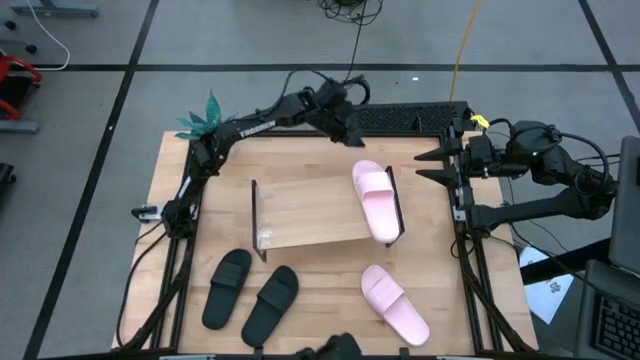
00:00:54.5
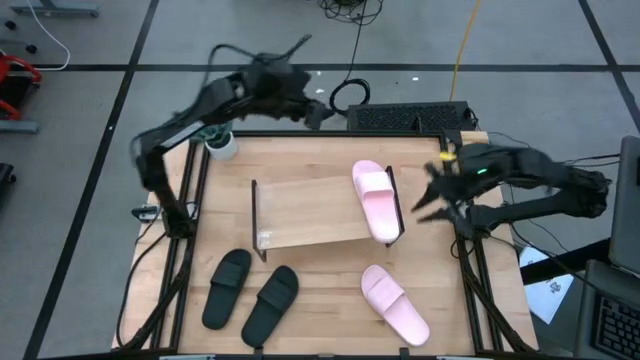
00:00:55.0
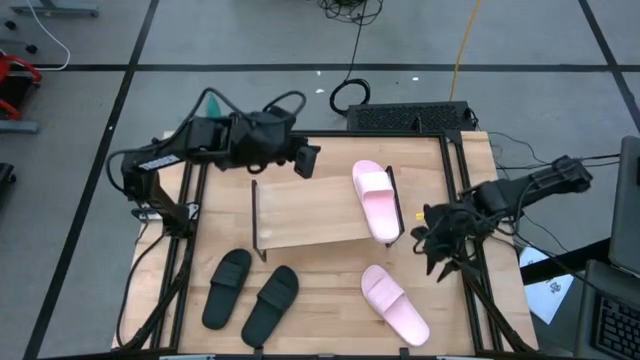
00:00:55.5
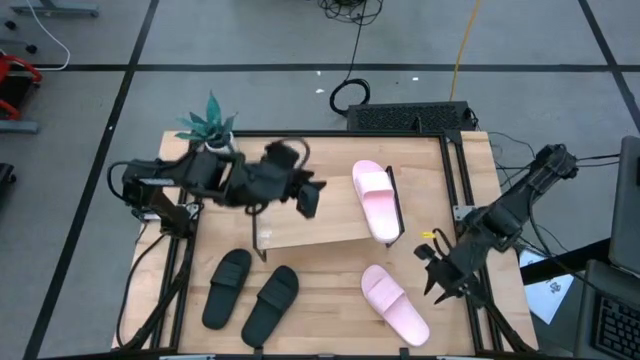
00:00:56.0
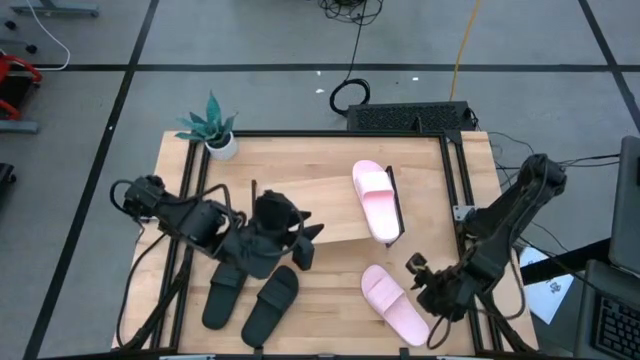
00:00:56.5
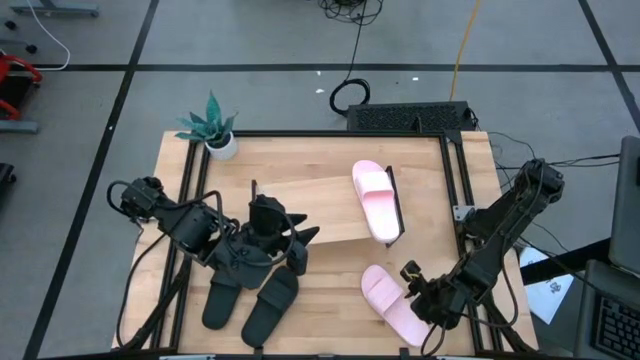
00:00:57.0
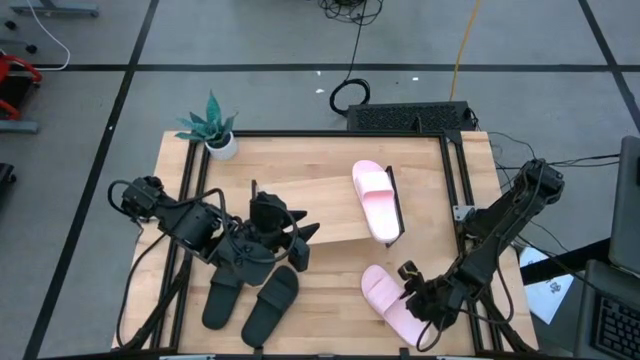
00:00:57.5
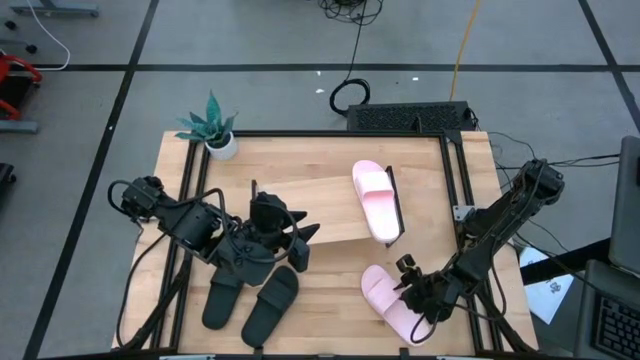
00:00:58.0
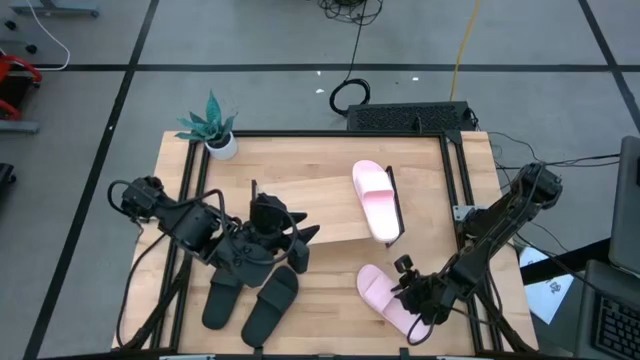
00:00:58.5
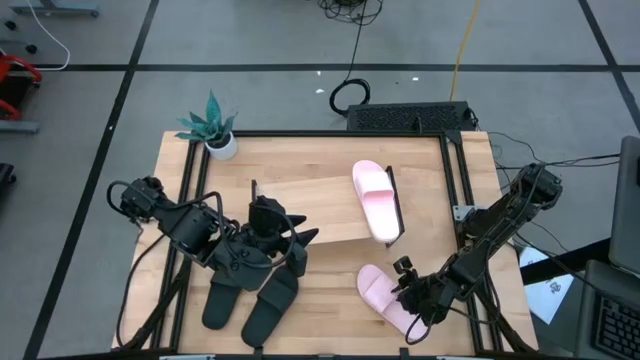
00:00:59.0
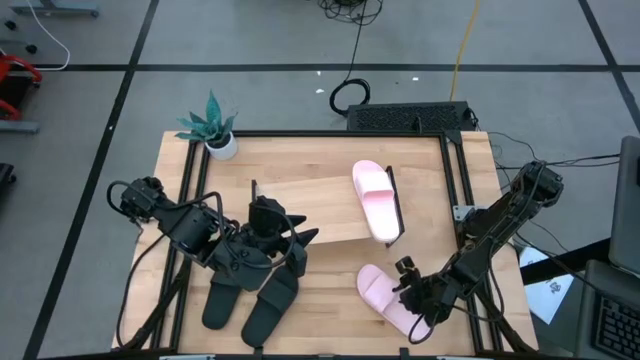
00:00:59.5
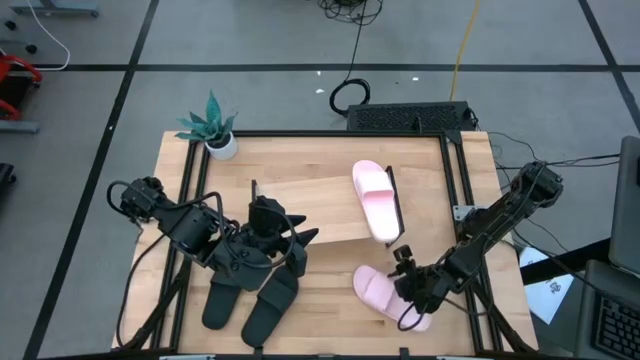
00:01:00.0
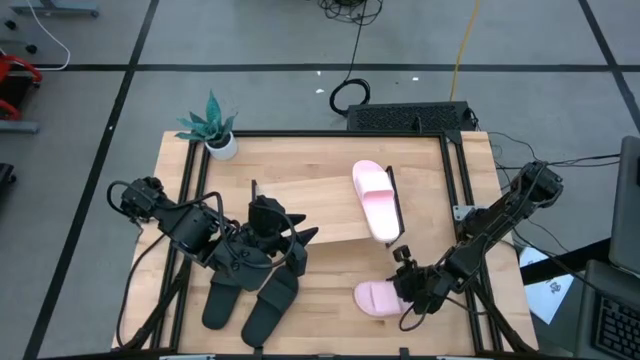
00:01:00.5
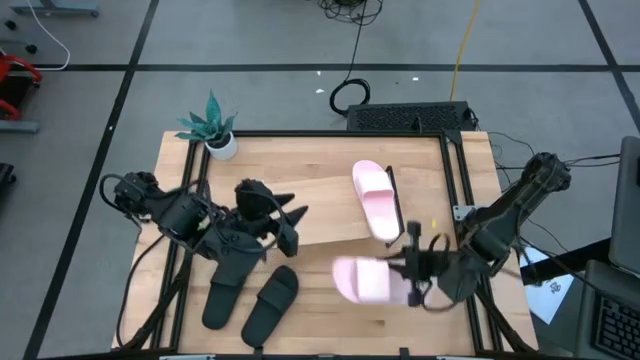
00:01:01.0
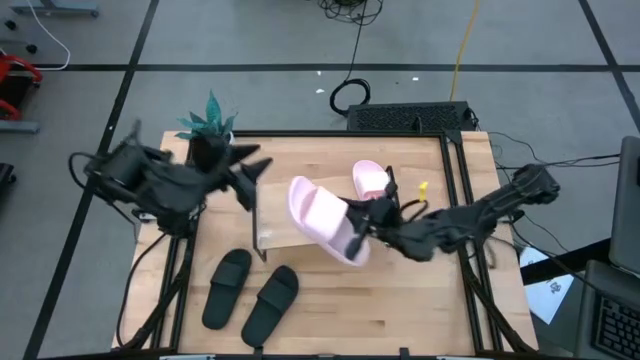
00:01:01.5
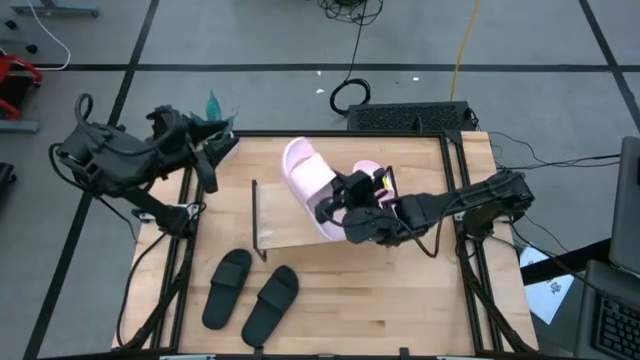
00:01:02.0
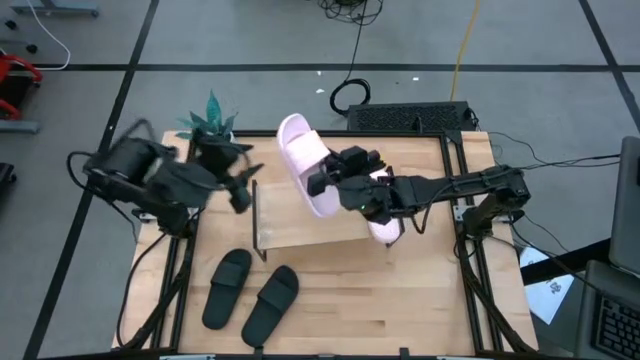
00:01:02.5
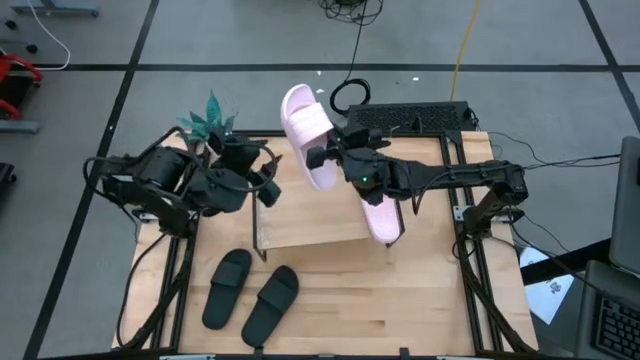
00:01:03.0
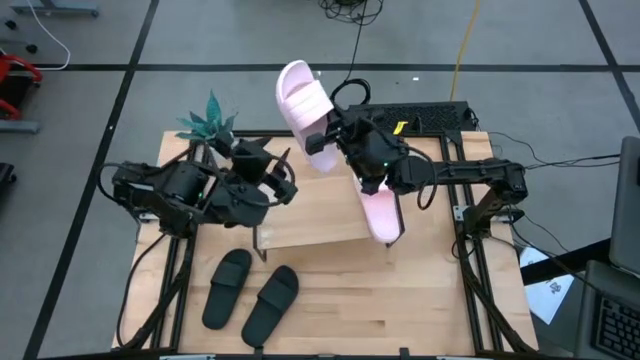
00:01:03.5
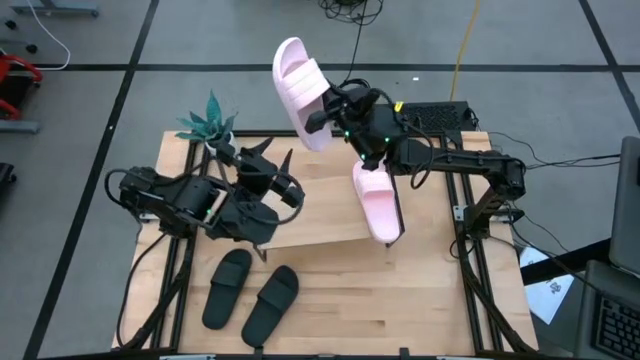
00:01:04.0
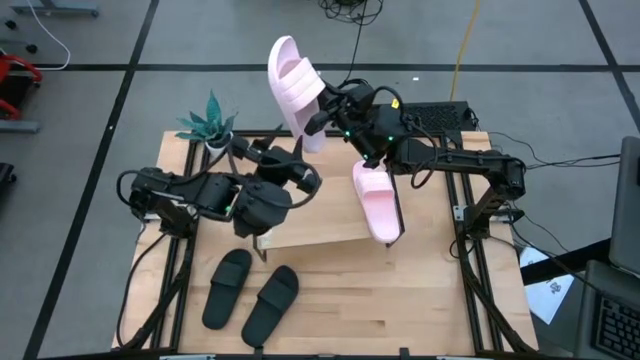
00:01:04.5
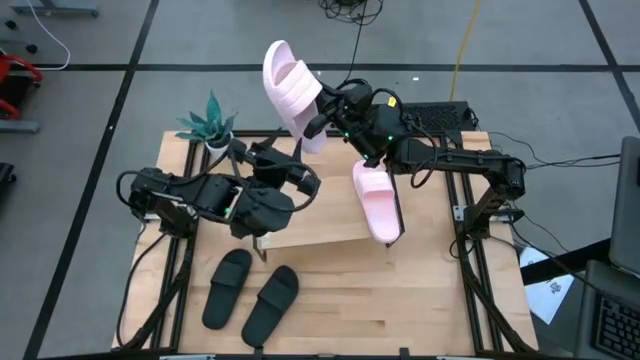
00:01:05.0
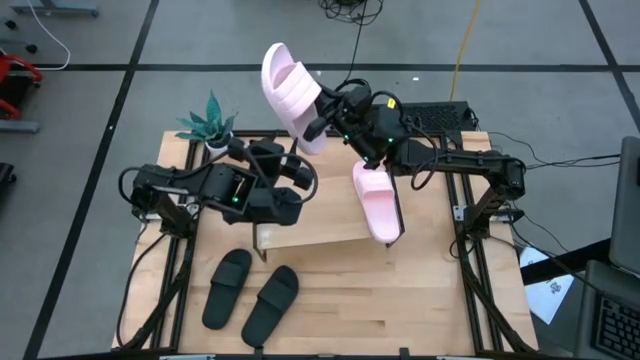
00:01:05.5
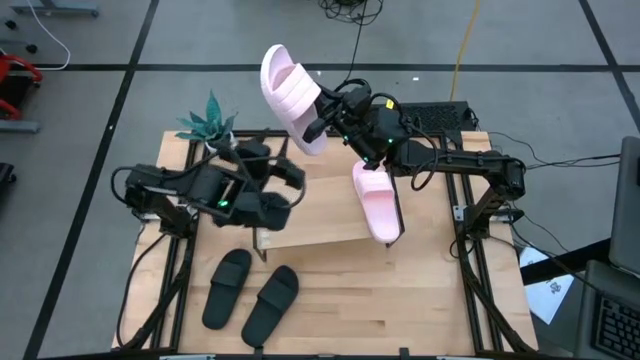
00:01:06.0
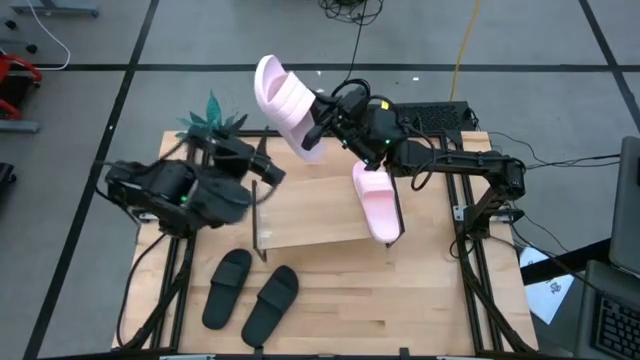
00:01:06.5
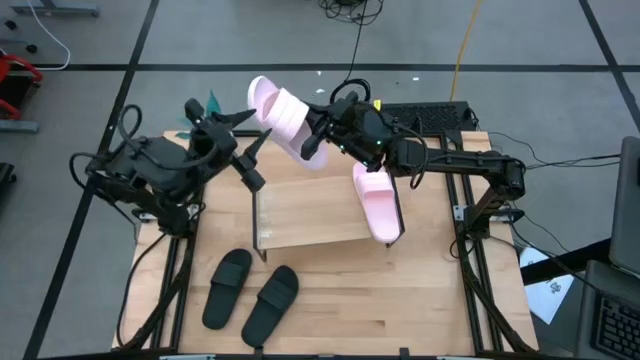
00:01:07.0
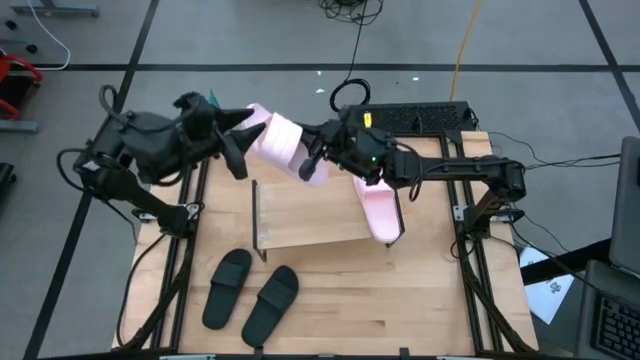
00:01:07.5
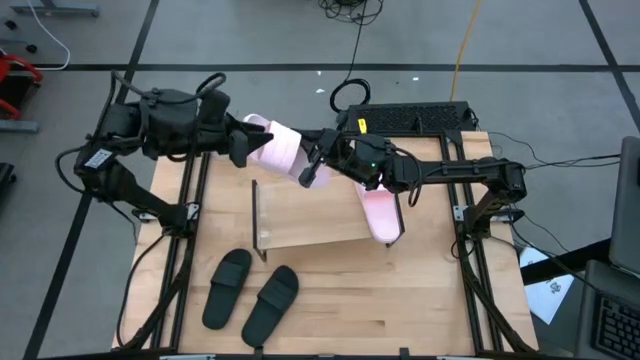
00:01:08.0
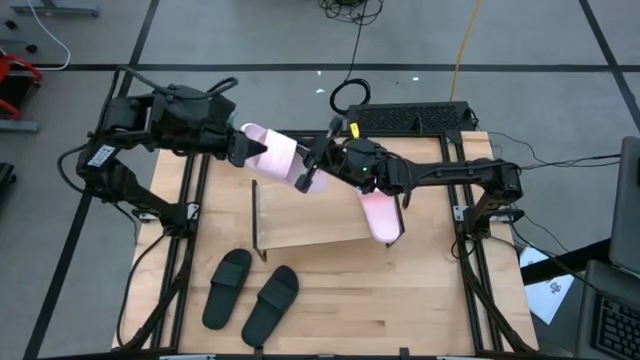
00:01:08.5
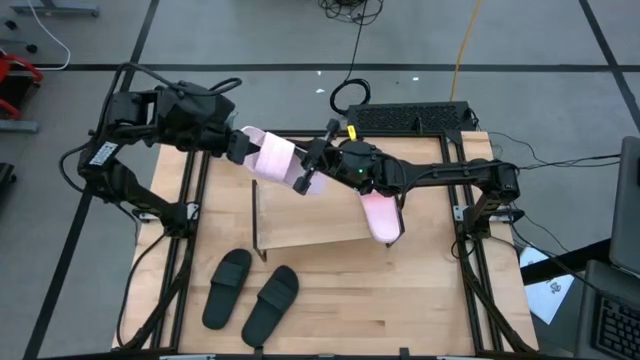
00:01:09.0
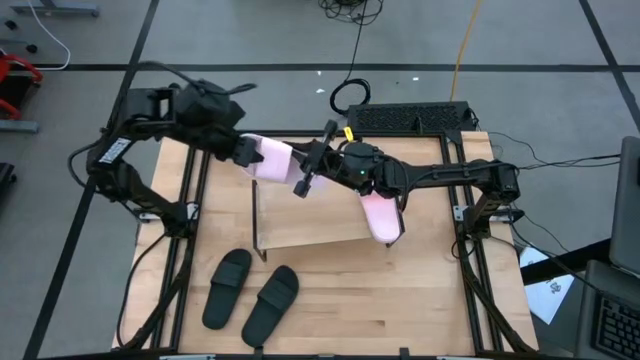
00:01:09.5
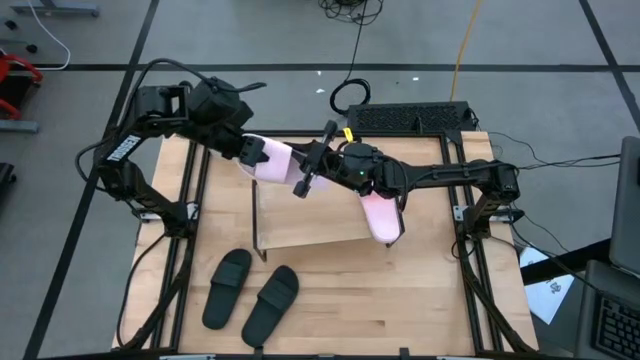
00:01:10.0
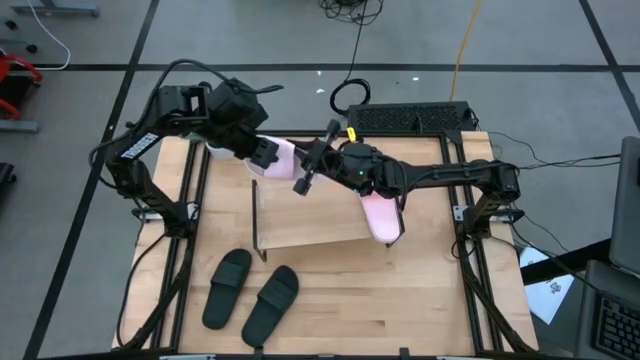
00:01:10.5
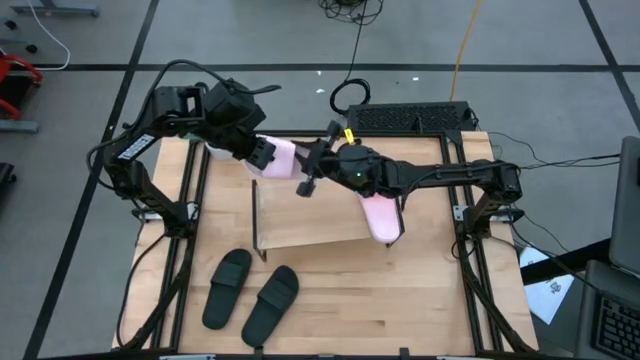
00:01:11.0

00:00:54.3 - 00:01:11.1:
Task: Pick and place slides into the shelf
Put the pink slipper on the shelf

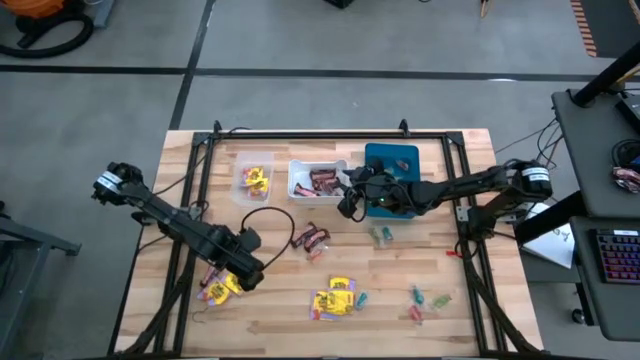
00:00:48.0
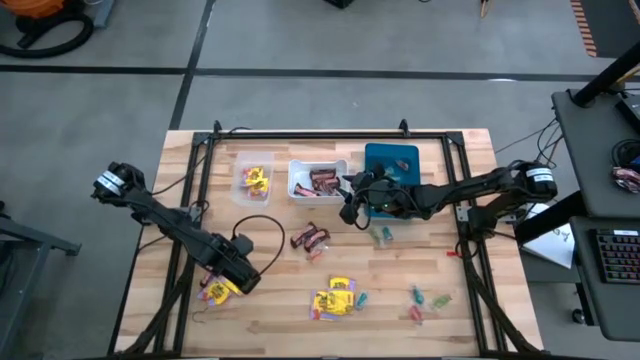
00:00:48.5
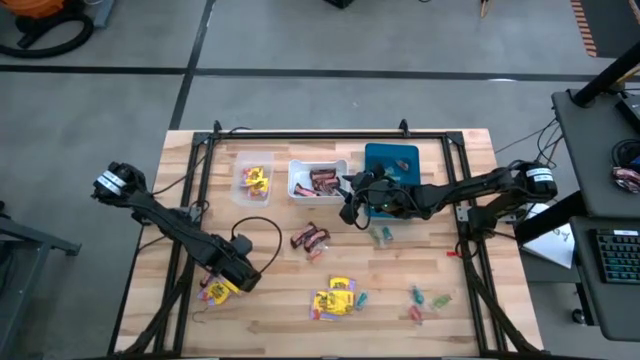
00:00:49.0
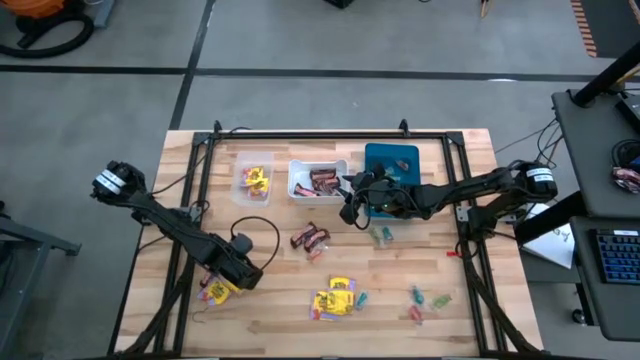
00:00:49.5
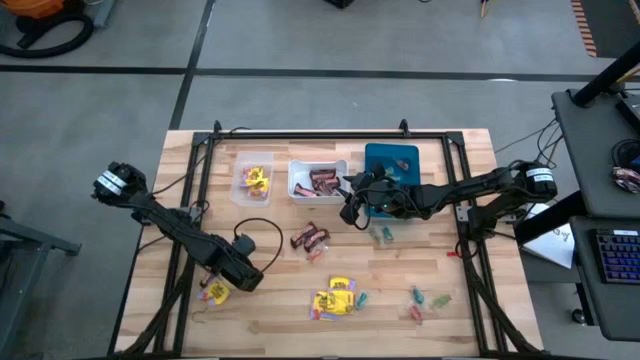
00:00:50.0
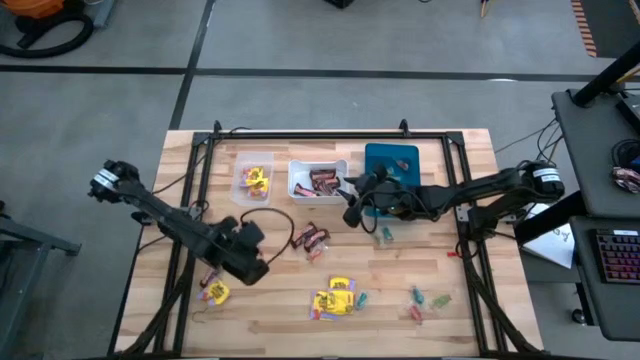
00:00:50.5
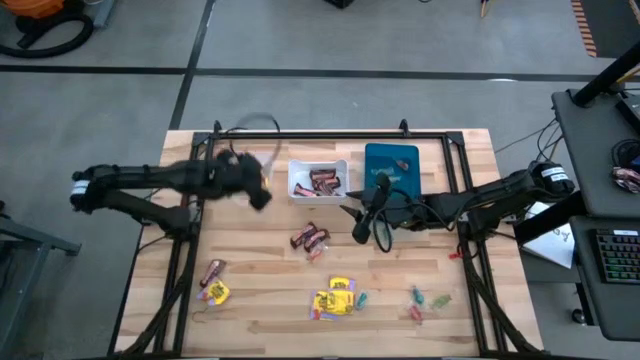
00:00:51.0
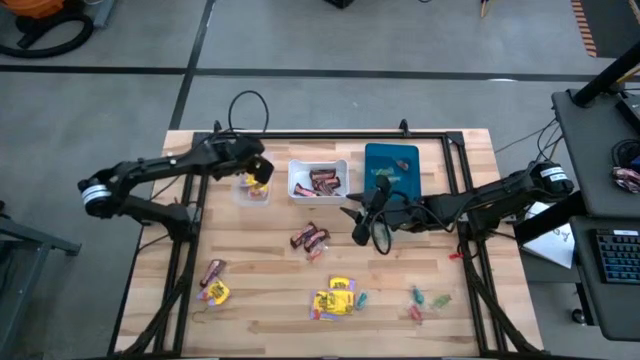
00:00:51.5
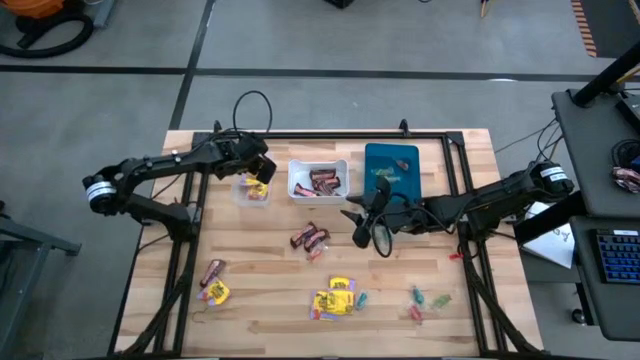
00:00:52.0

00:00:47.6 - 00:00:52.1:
Task: Sort candy
Put the yellow candy into the transparent bin
